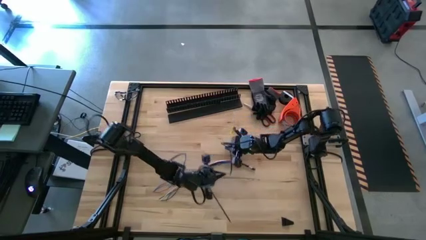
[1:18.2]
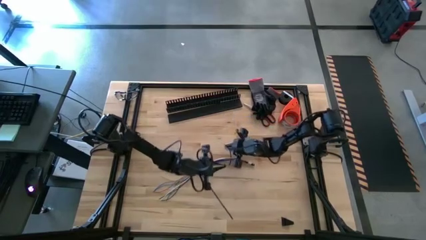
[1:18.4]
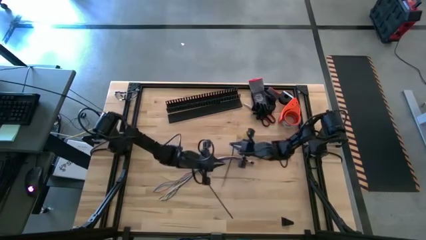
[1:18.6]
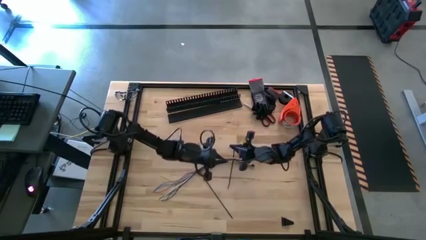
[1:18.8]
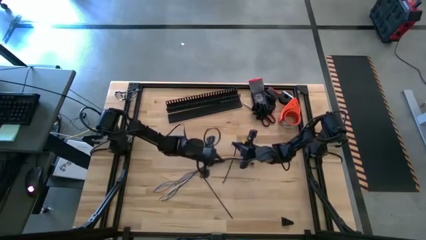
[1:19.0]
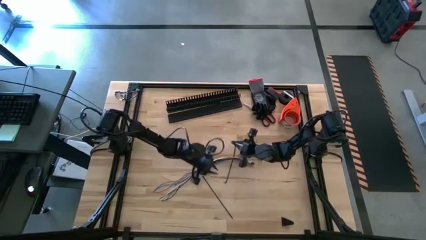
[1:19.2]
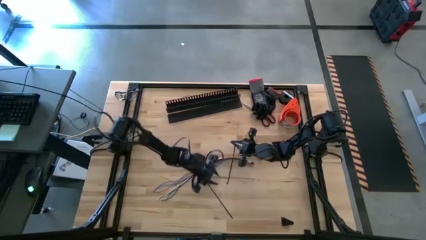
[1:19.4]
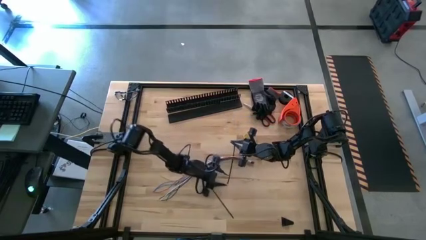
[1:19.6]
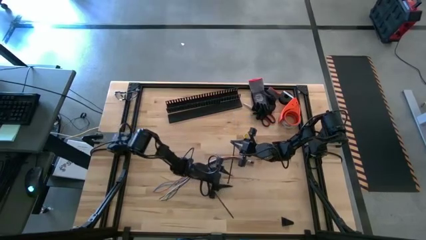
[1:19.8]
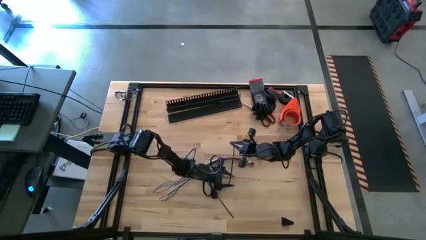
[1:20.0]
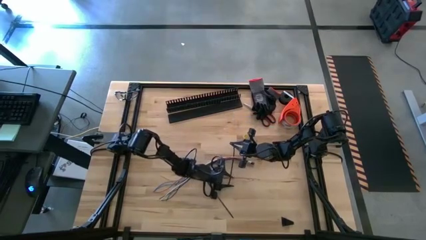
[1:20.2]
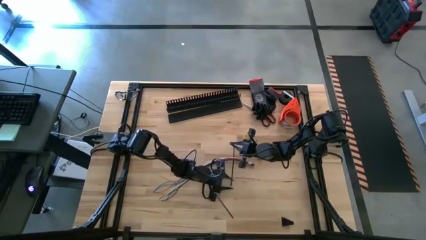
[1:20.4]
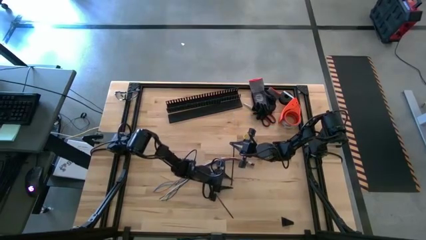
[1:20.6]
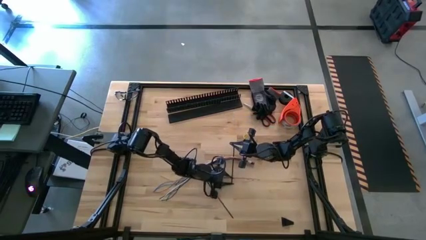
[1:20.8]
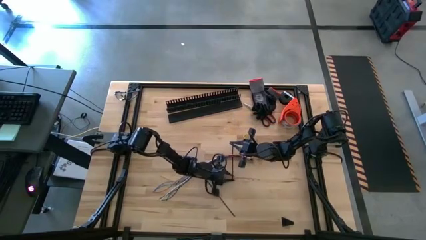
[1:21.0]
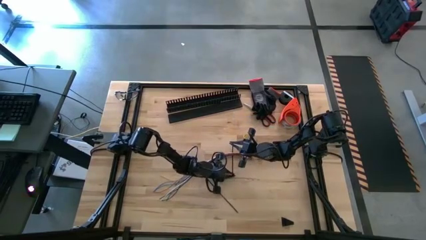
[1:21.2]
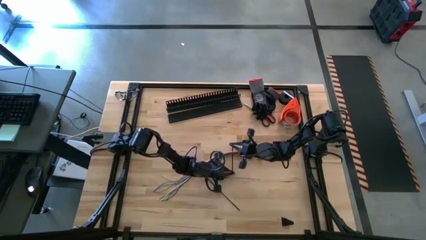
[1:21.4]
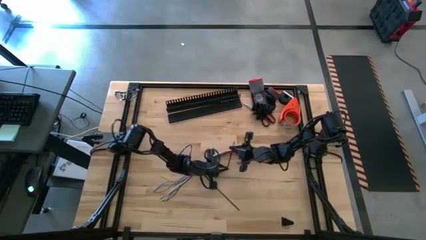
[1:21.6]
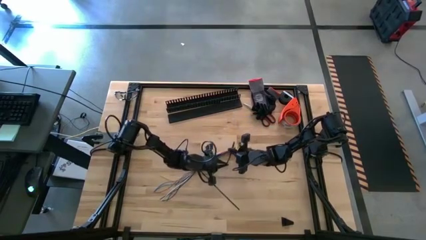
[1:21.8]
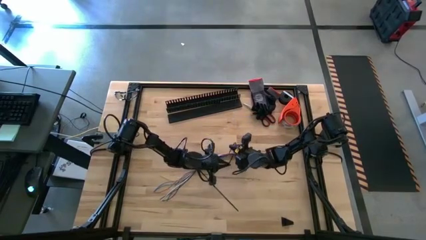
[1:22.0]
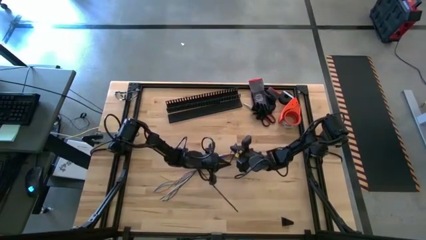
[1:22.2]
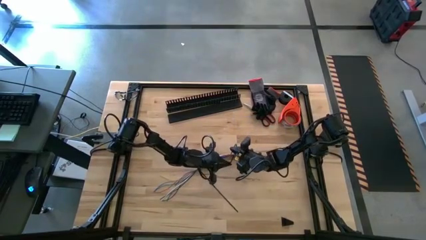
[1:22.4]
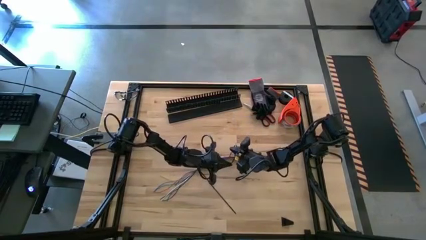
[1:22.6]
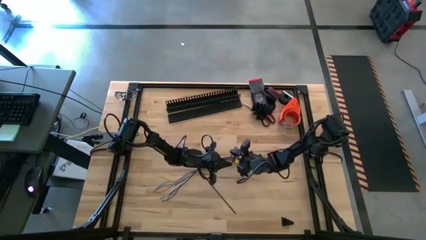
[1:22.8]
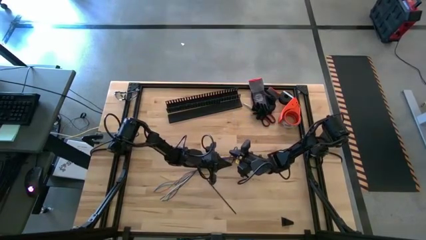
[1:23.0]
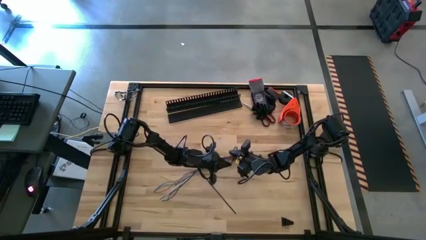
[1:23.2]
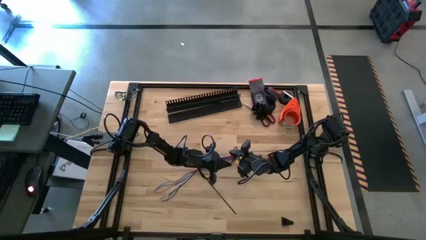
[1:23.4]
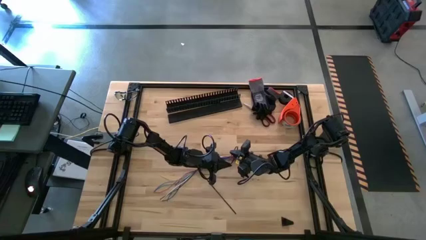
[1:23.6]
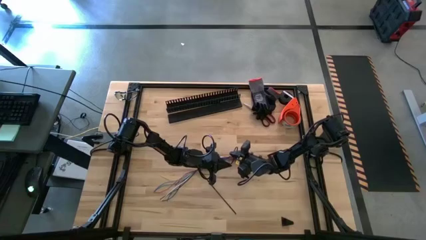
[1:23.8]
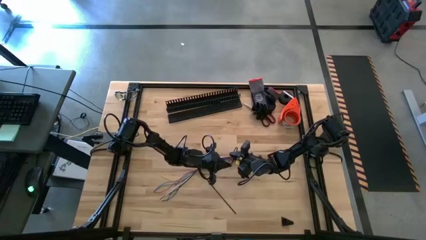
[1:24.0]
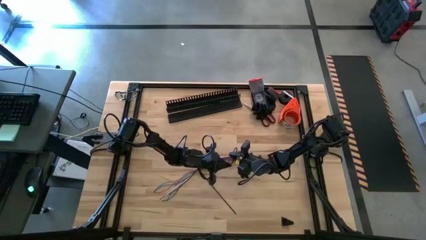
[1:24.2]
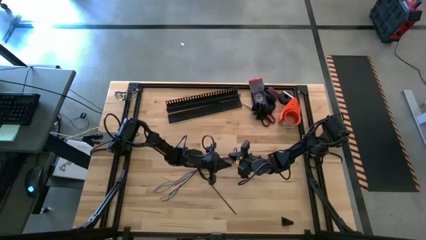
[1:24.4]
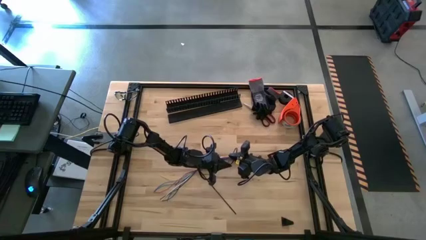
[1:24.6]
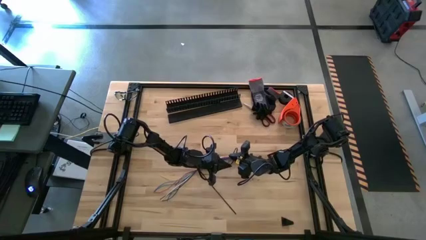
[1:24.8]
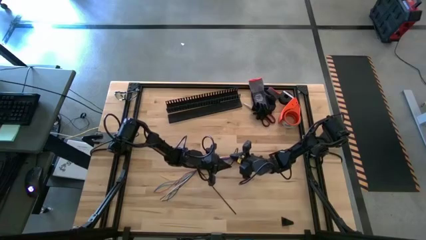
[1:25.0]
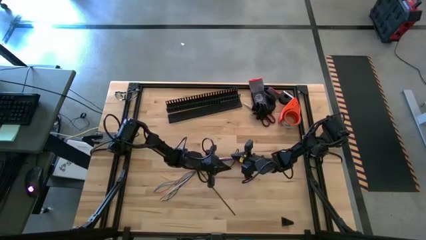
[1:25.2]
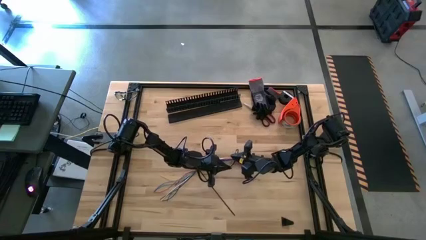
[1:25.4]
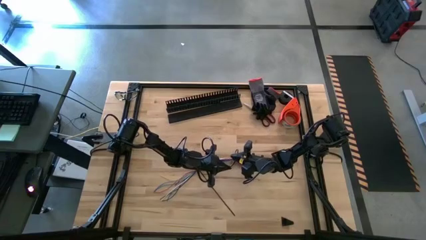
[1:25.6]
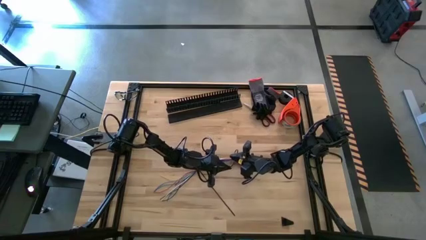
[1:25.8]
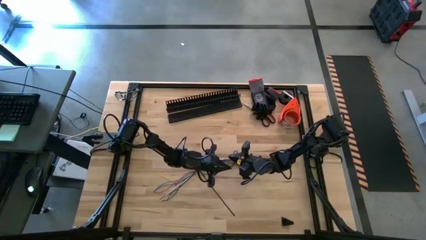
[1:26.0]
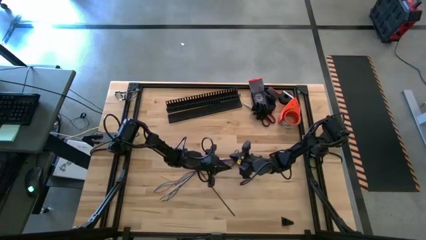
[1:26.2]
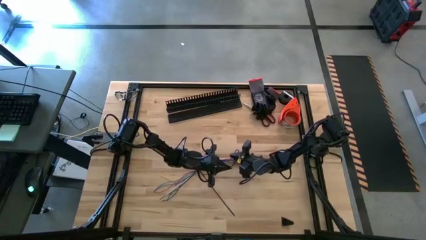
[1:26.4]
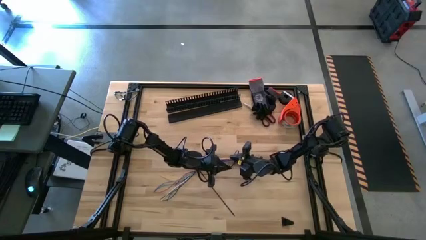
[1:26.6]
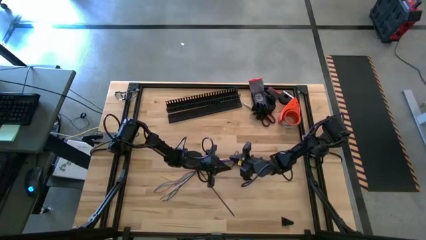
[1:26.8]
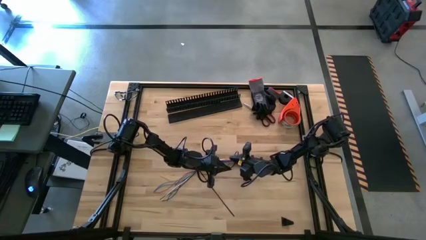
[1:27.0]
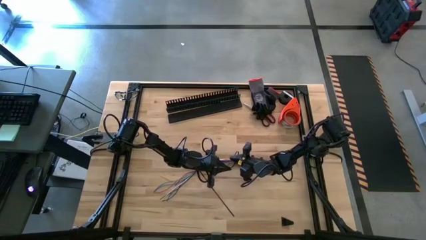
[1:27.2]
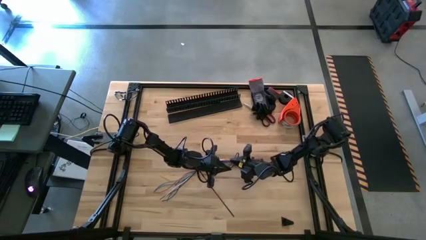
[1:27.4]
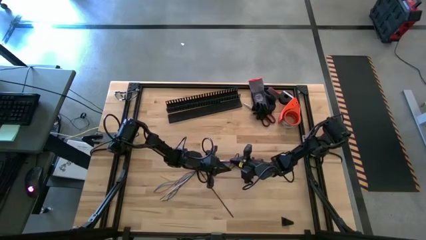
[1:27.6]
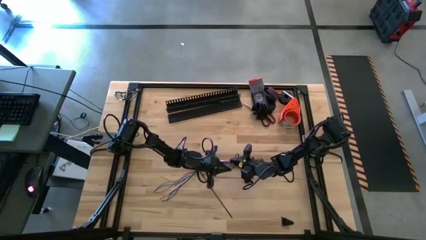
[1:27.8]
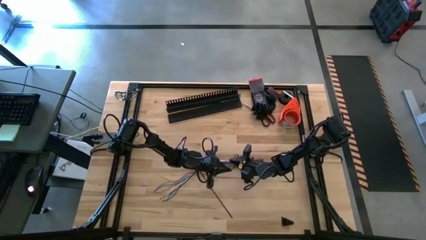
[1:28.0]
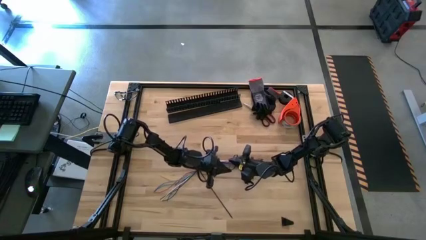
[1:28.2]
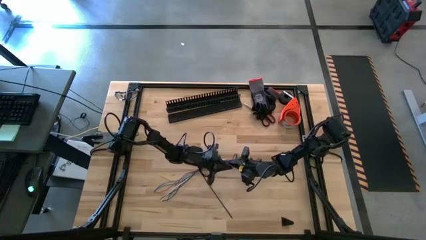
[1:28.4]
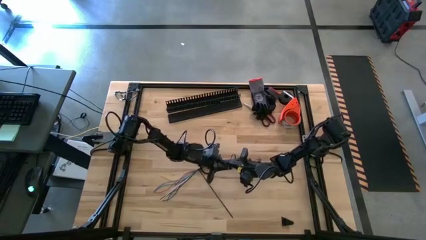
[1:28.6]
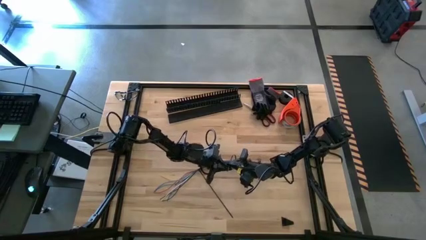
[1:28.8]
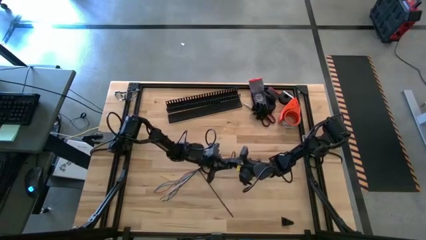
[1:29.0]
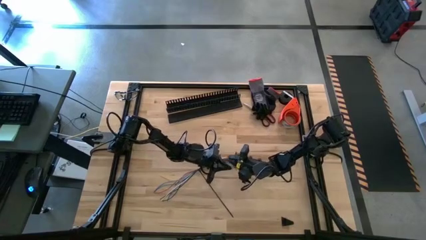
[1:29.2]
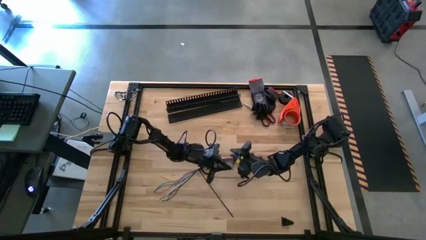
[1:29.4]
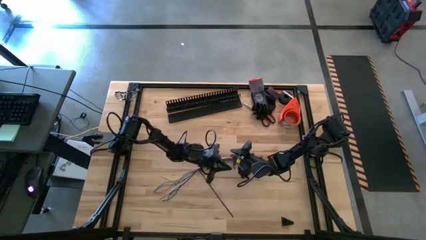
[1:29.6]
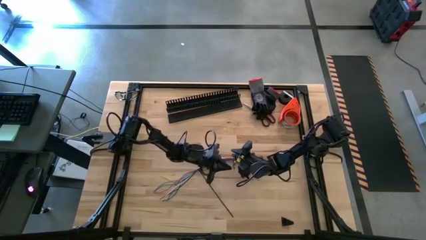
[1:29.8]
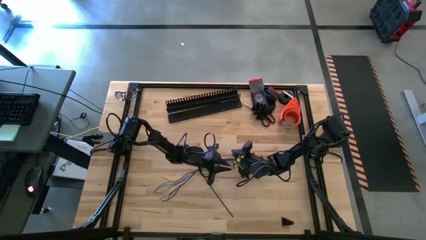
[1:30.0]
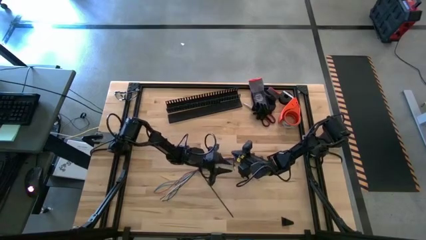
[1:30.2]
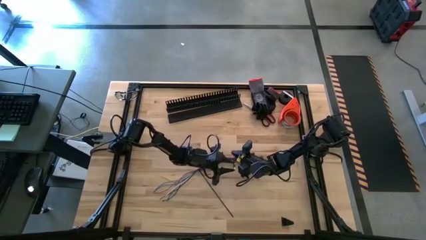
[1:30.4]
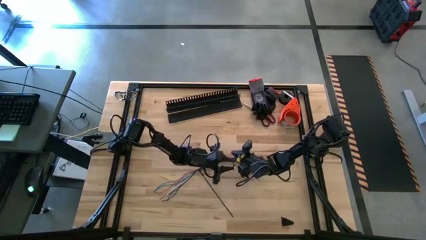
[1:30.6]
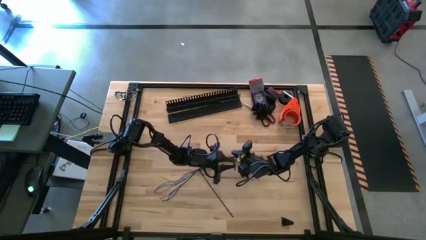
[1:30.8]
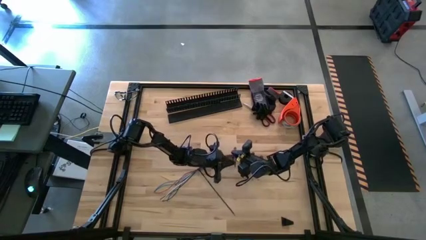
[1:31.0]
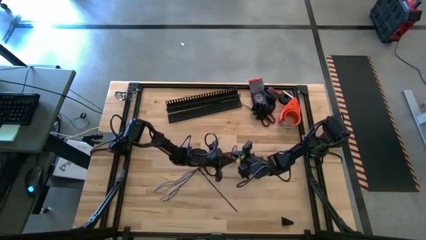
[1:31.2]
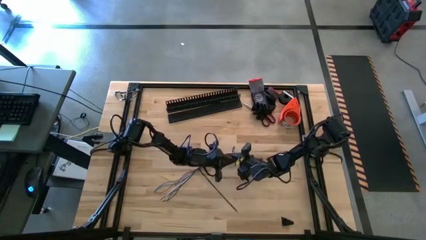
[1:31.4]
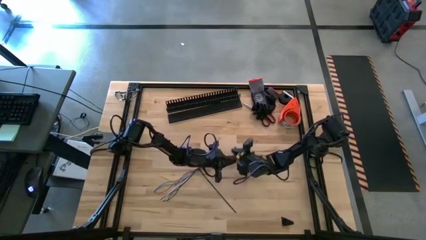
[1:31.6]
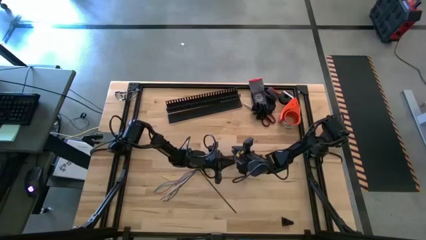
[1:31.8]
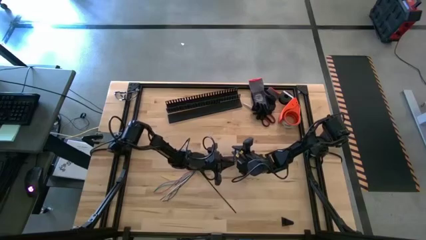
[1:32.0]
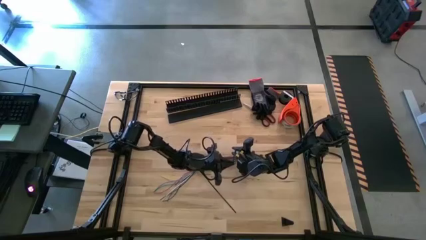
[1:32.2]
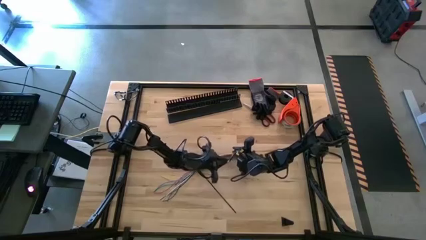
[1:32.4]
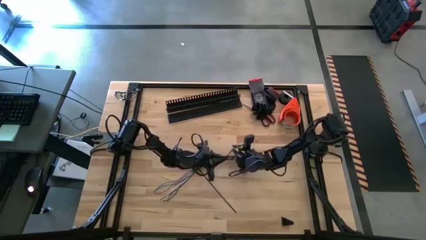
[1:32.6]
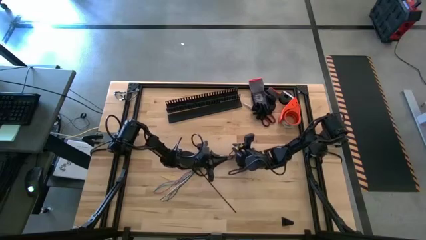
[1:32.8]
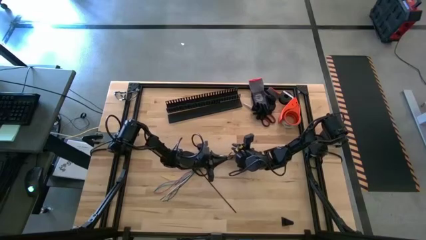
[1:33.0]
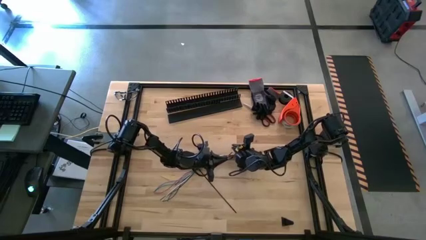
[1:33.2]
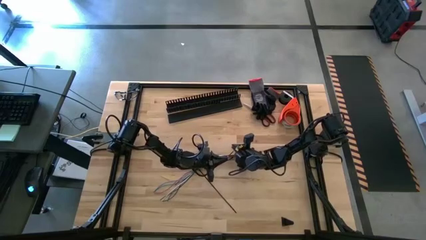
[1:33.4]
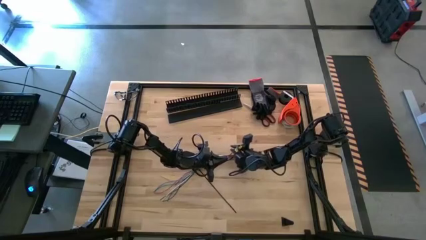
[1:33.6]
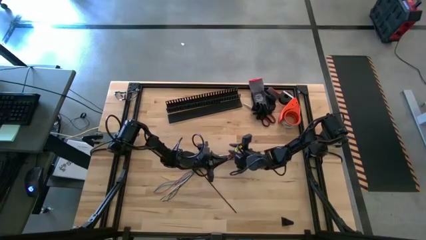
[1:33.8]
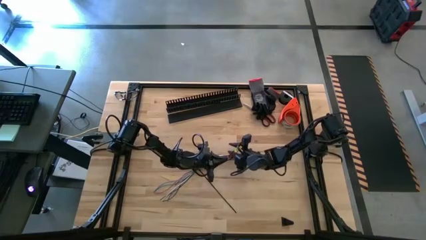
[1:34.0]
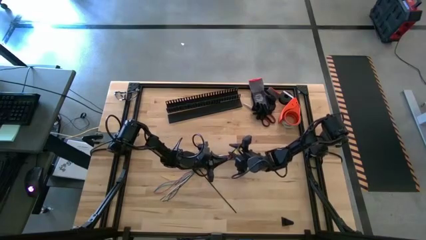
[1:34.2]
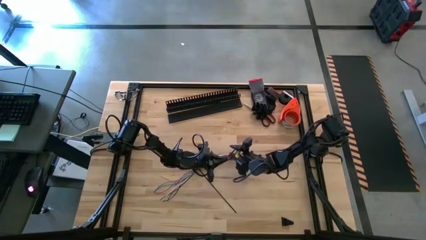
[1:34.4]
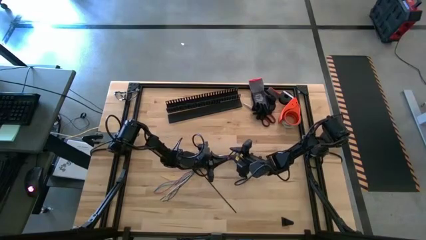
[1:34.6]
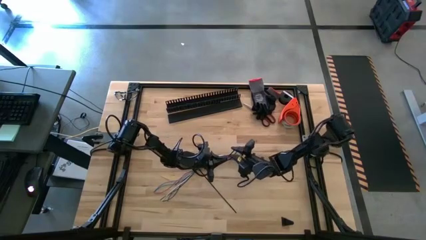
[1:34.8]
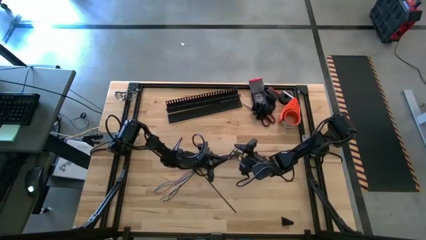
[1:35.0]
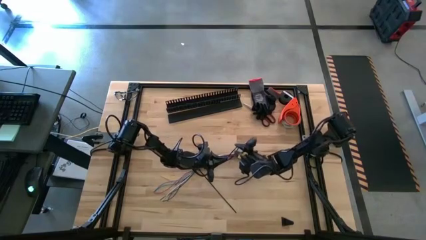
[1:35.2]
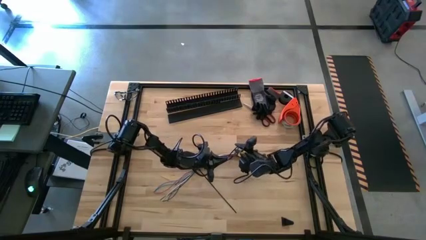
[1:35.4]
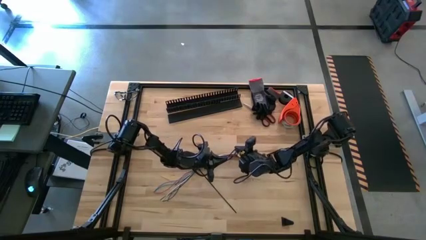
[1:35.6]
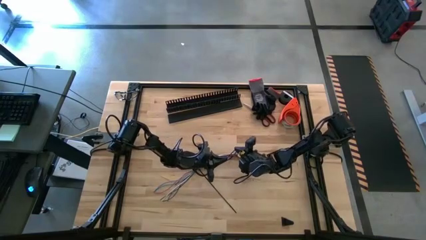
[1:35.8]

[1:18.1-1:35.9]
Task: Ziptie cables
Wrap the black zip tie around the colored cable bundle
